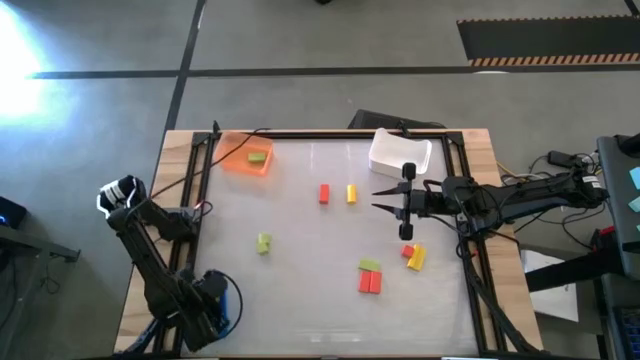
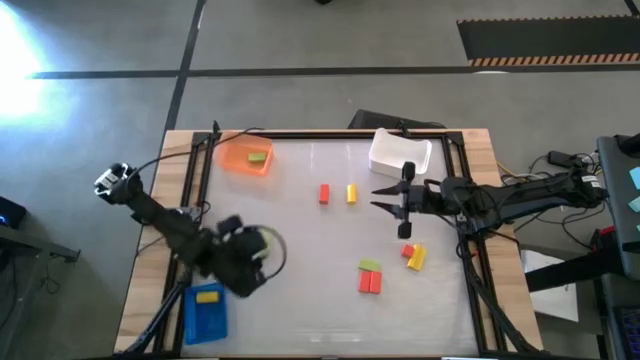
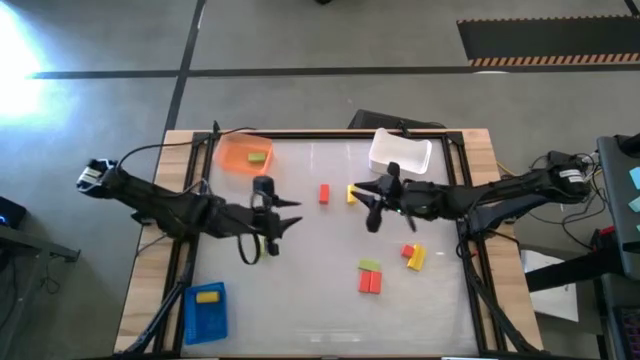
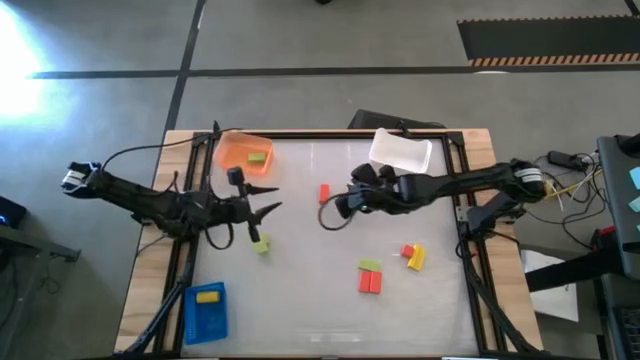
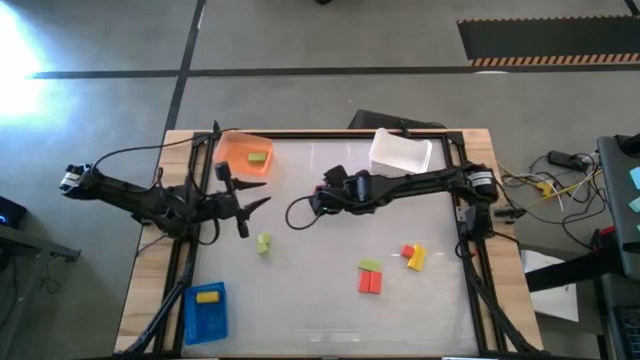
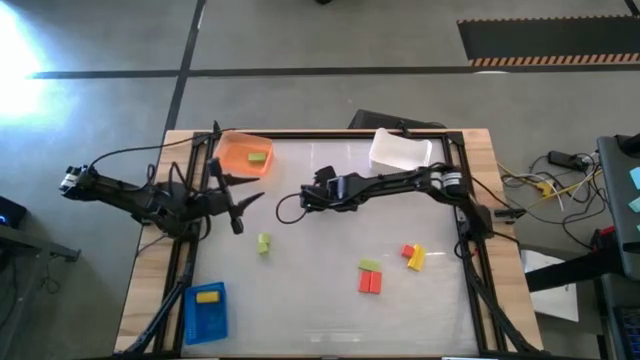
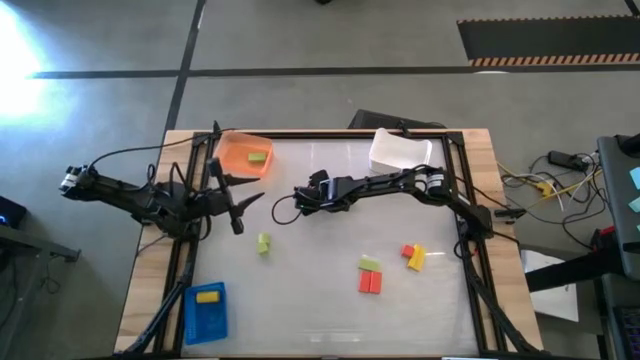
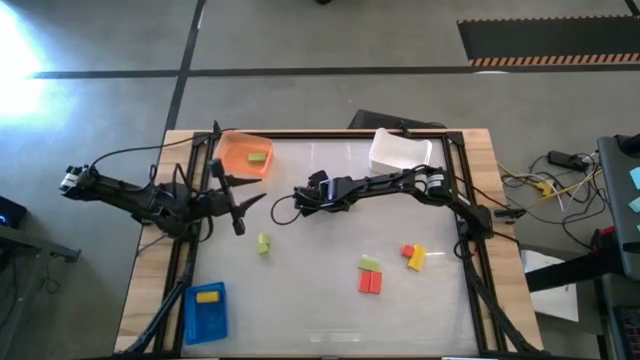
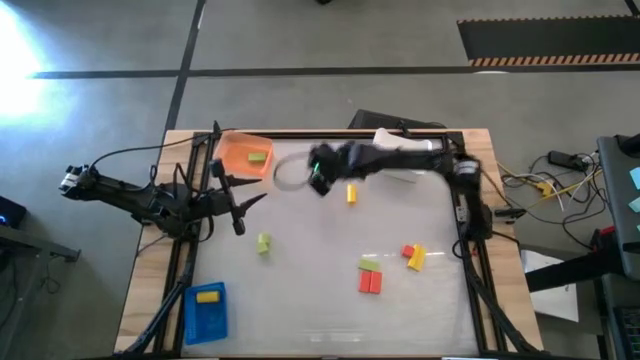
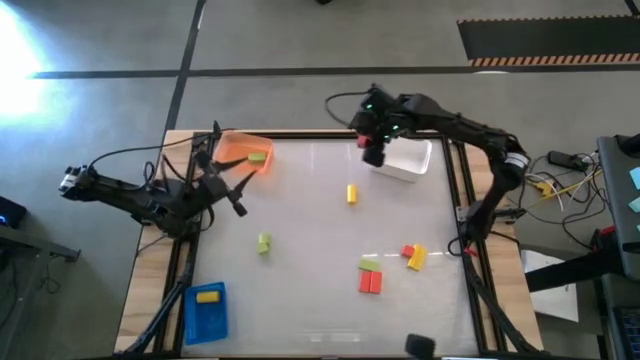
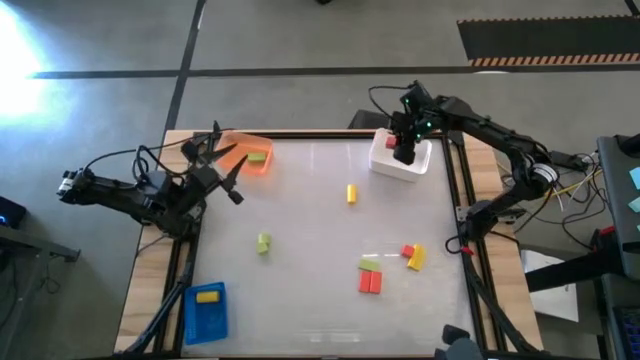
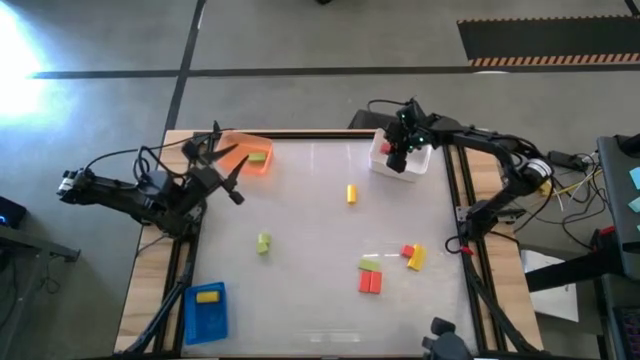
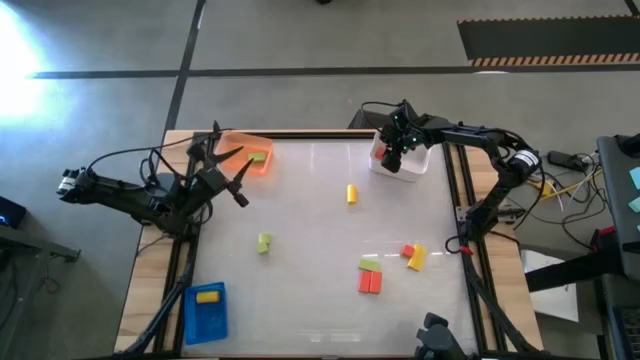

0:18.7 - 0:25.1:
Task: Sort & place blocks by color
Put the top orange rectangular block into the white bin

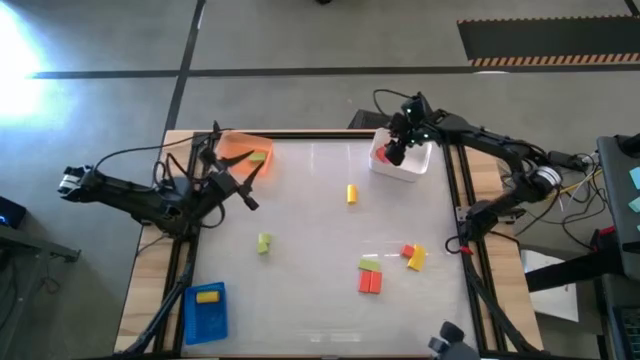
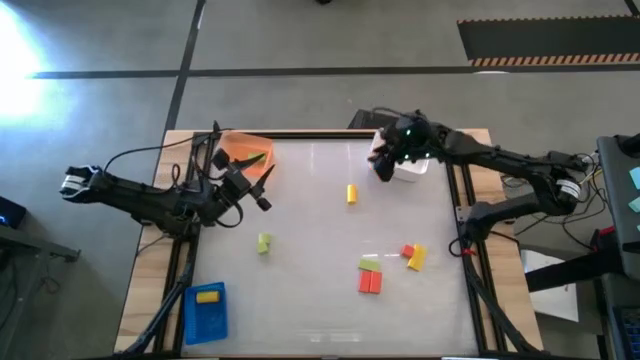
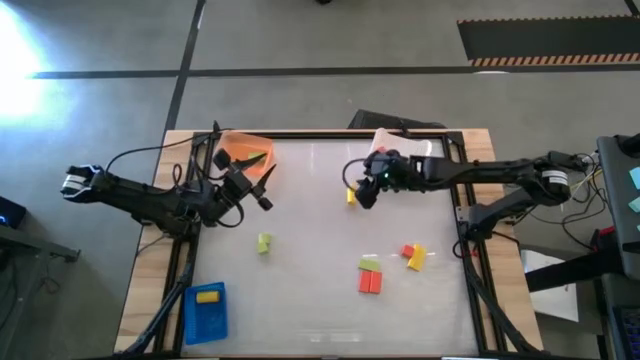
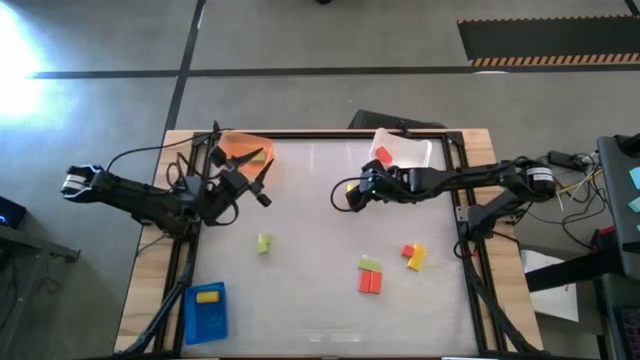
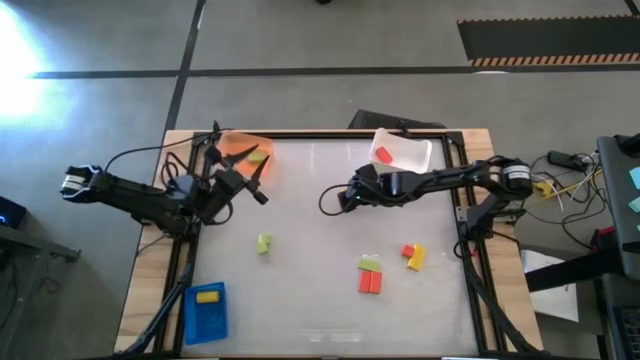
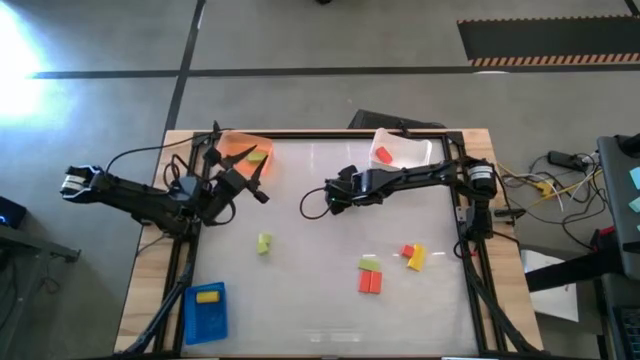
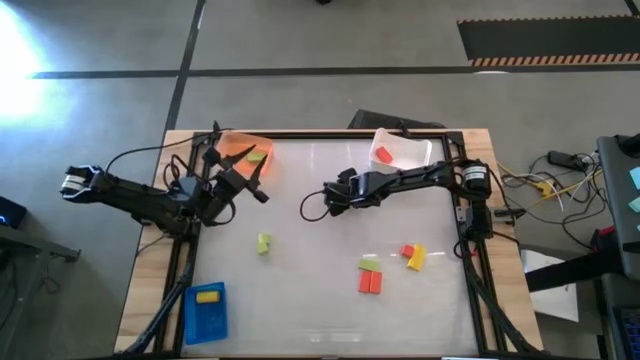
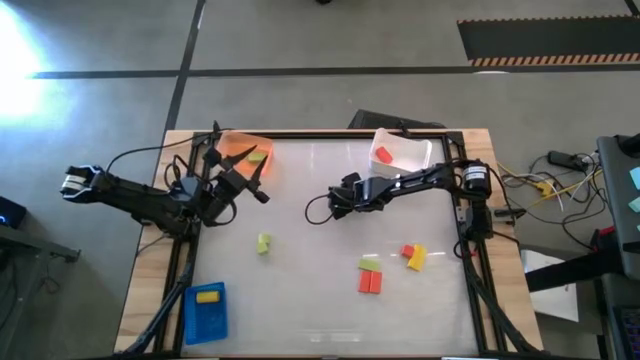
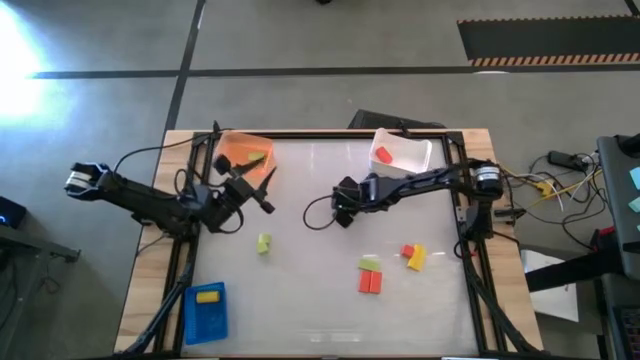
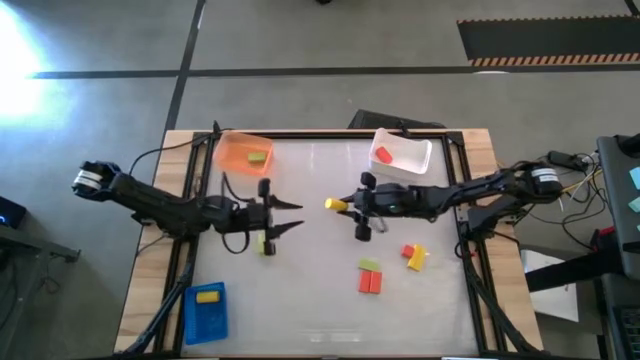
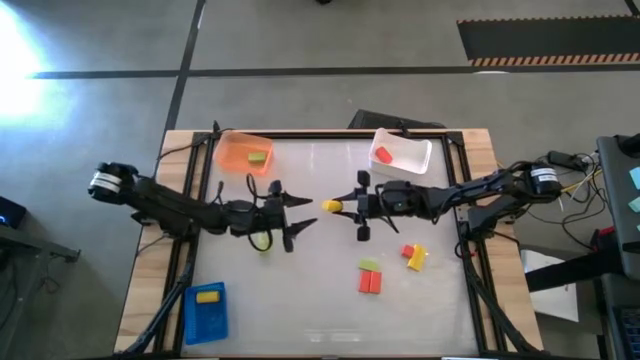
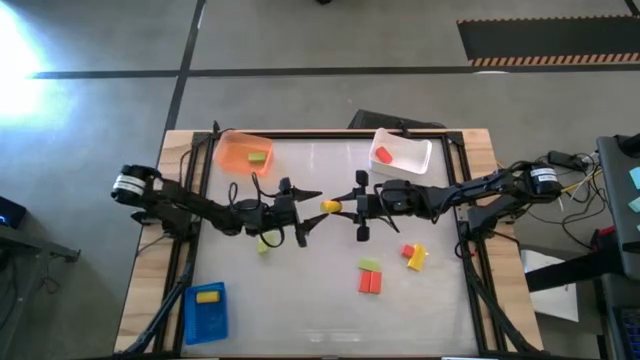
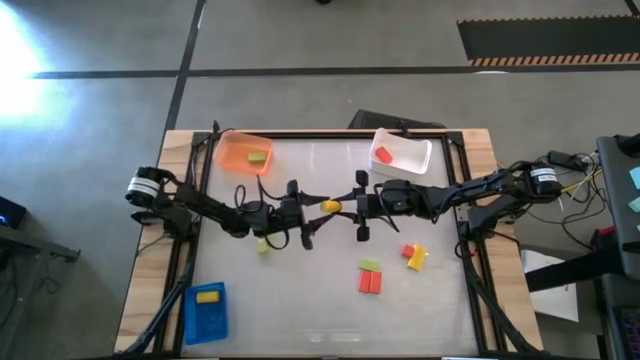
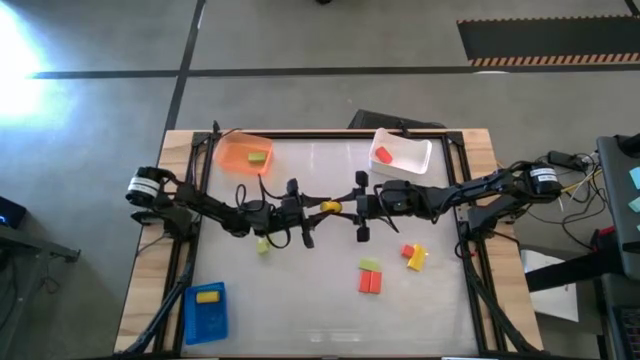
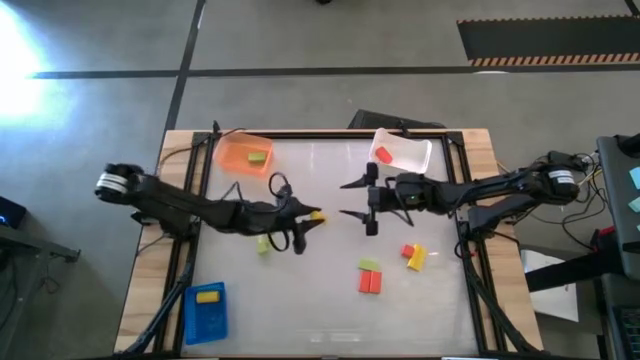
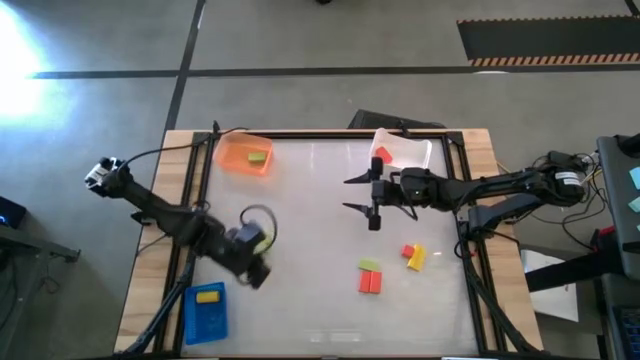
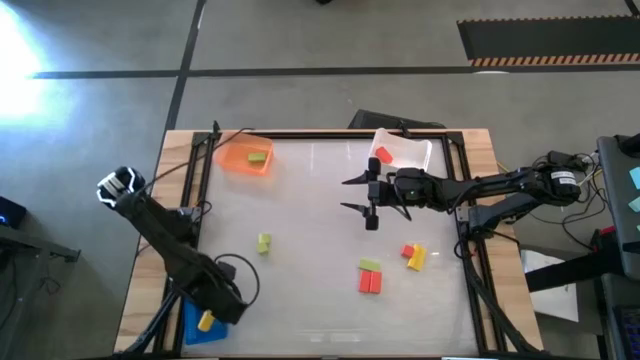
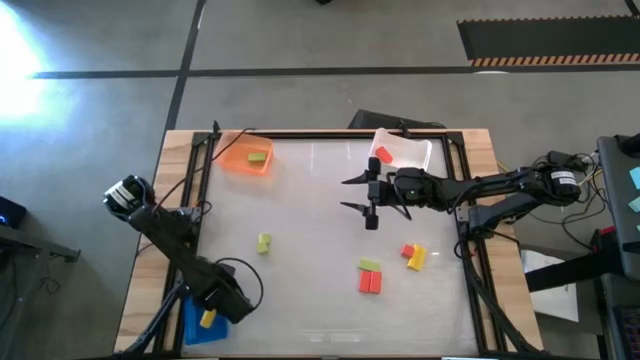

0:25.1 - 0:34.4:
Put the yellow cylindrical block into the blue basket

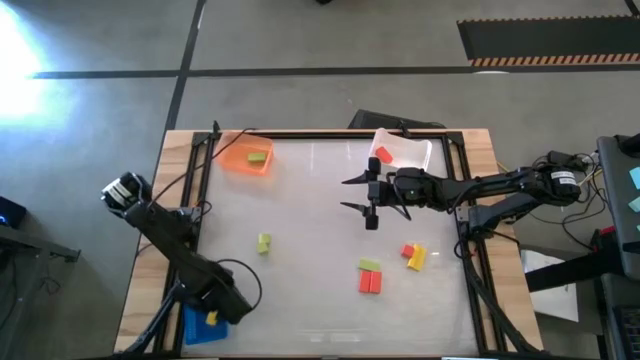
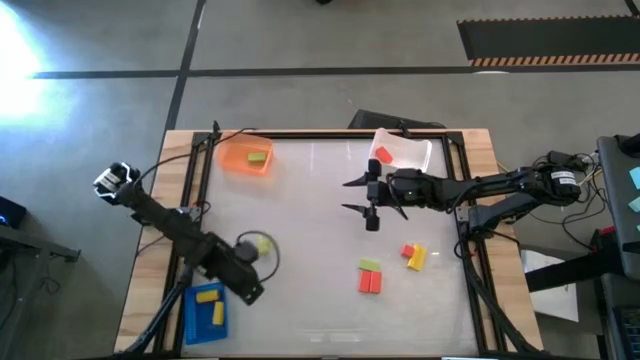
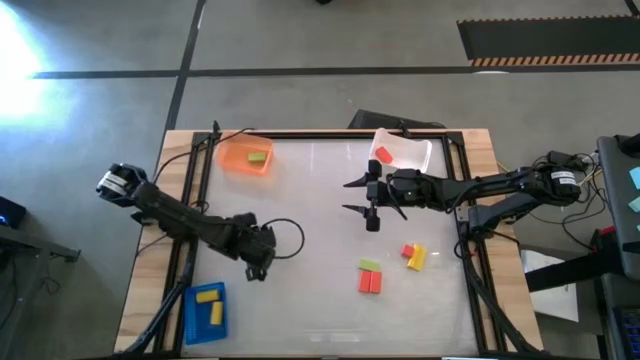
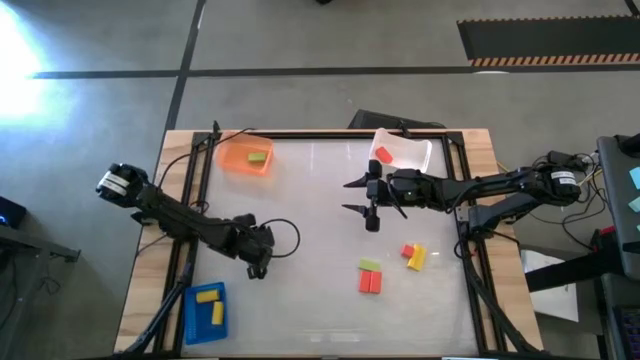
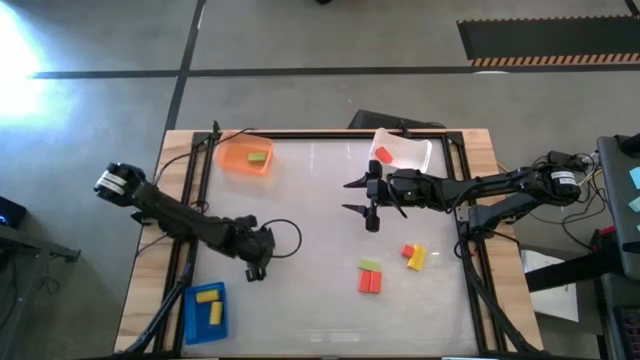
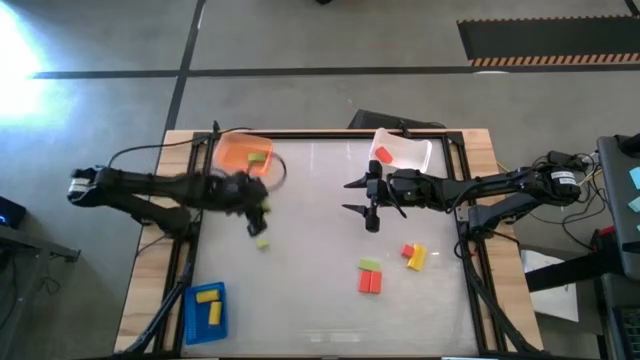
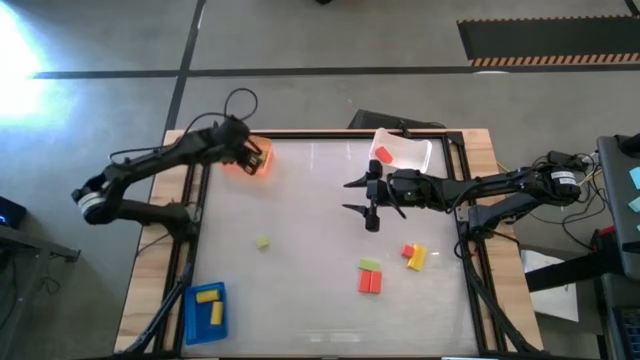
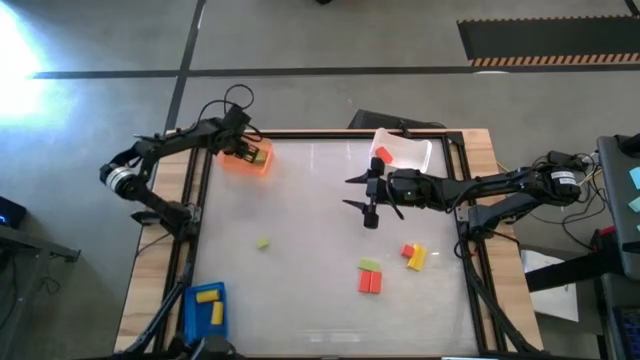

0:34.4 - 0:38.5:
Put the green square block into the orange bin

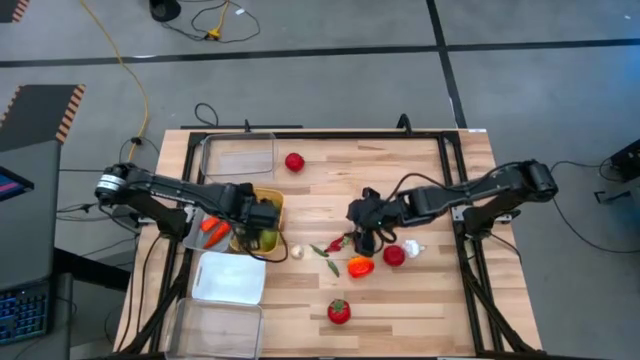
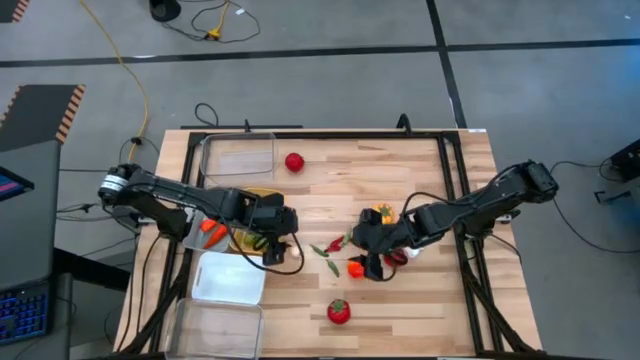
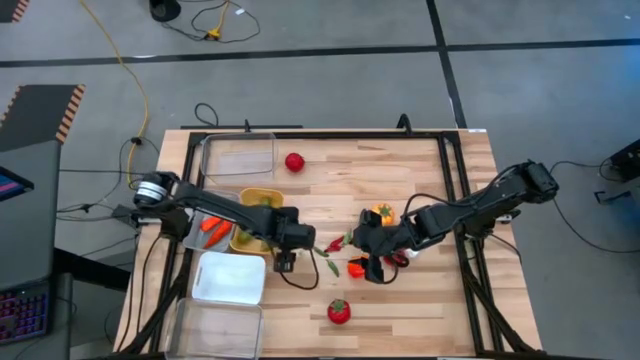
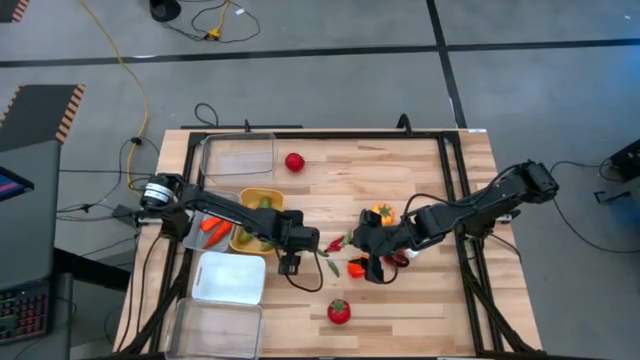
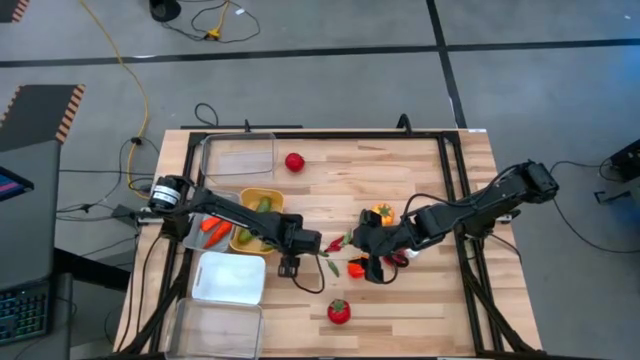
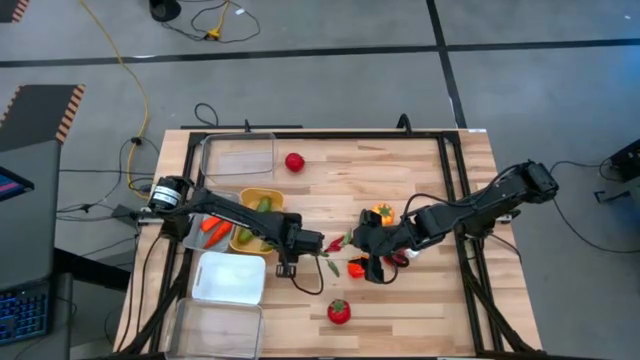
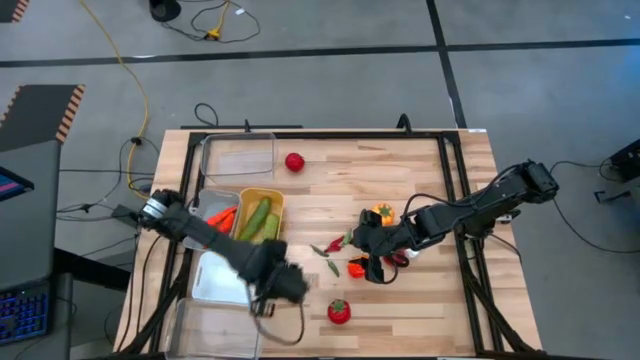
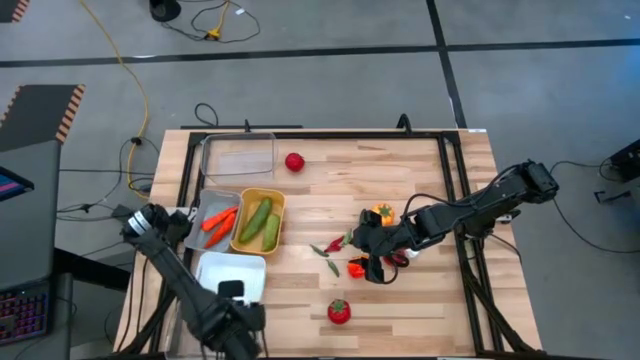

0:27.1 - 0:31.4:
Task: Sort produce into baskets
Put the left garlic into the bottom transparent bin
